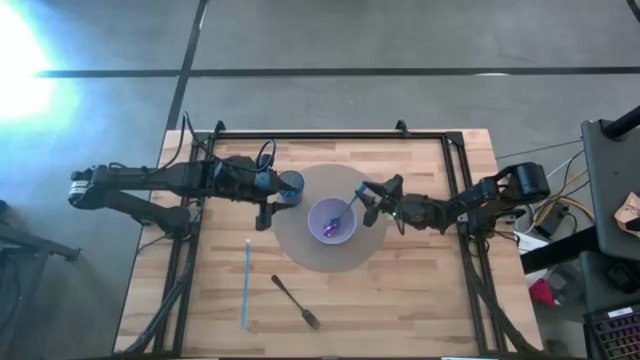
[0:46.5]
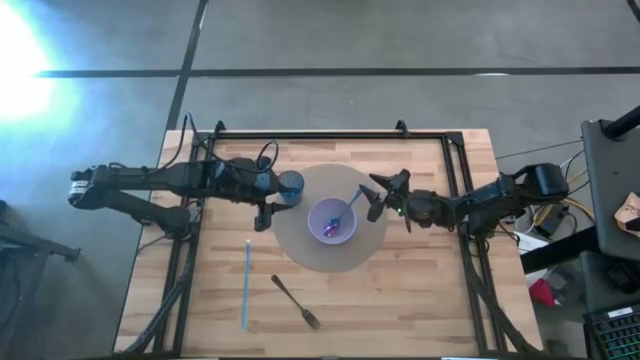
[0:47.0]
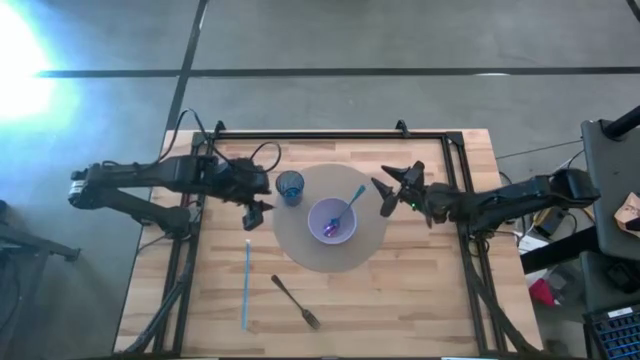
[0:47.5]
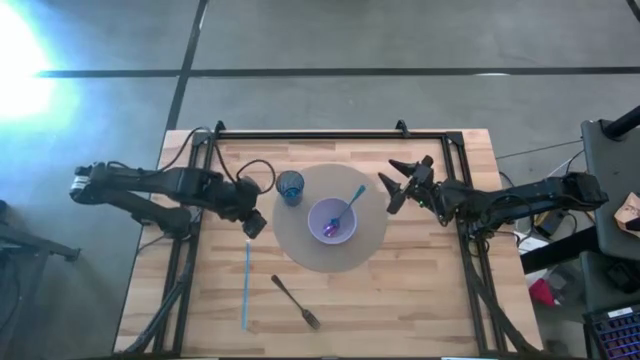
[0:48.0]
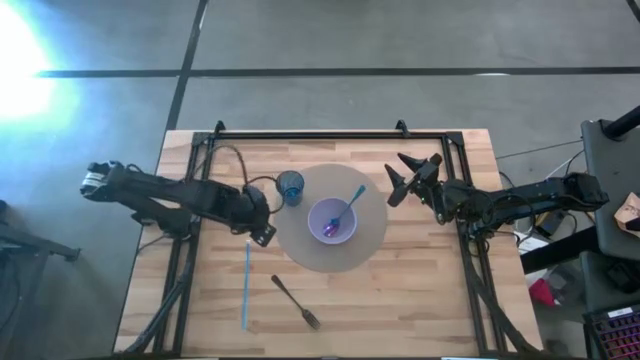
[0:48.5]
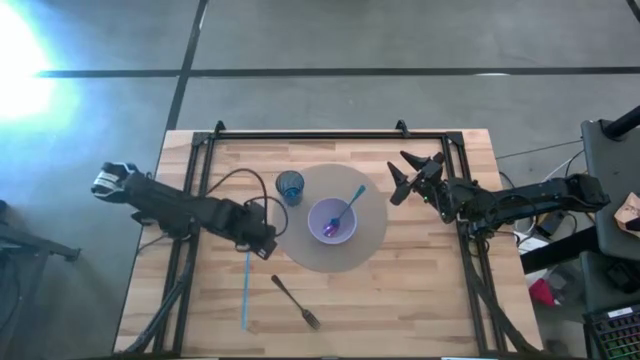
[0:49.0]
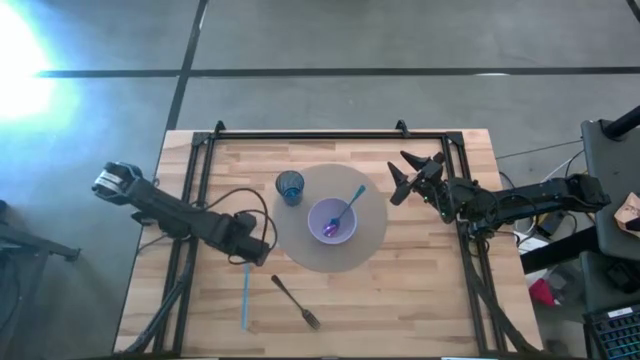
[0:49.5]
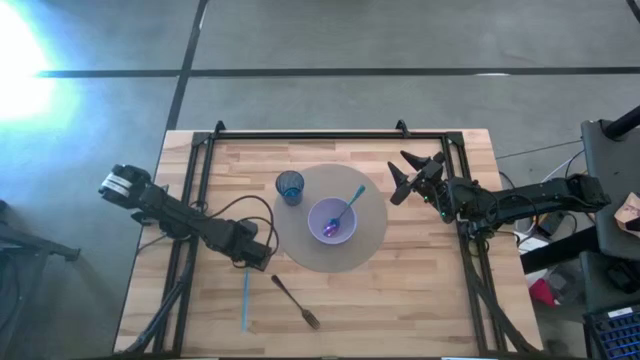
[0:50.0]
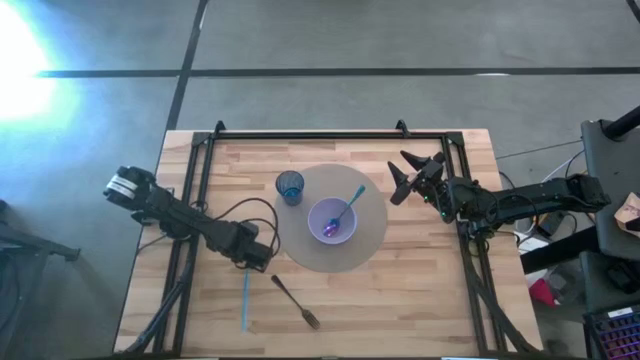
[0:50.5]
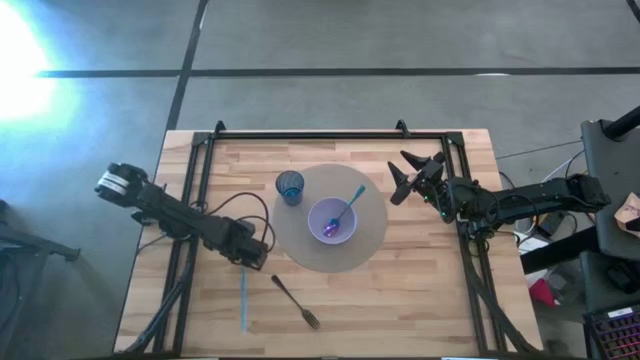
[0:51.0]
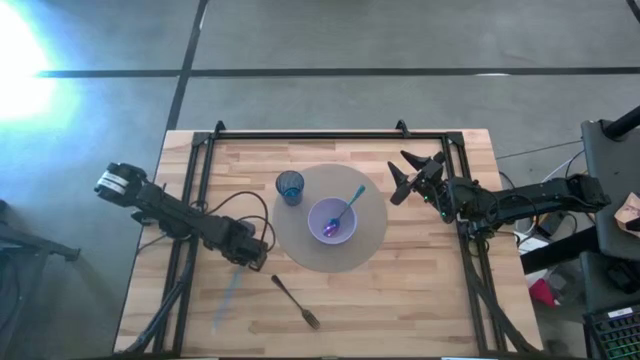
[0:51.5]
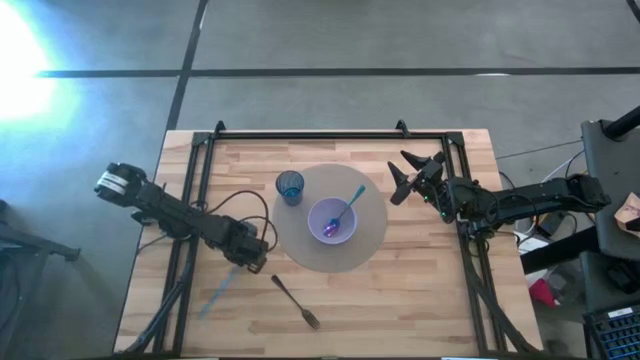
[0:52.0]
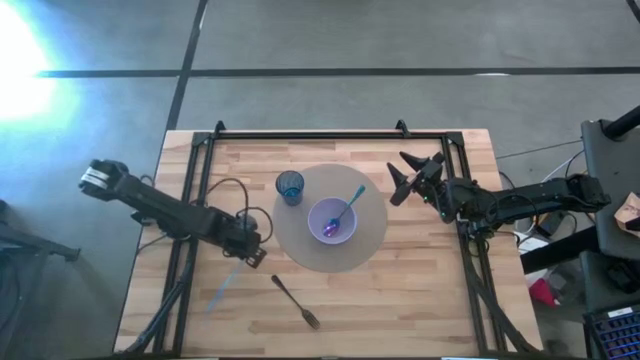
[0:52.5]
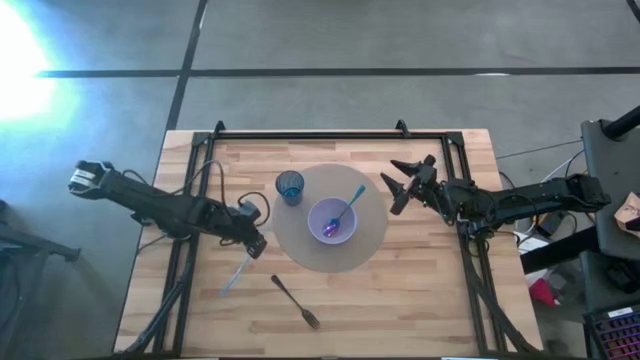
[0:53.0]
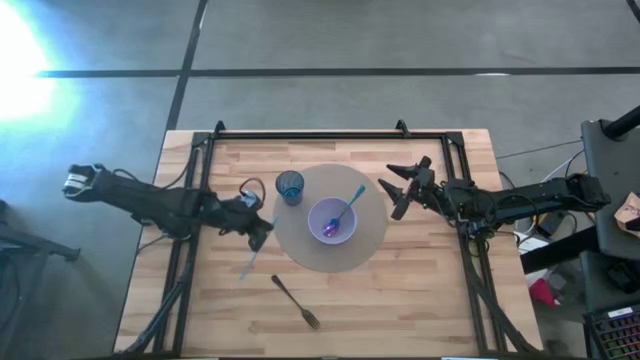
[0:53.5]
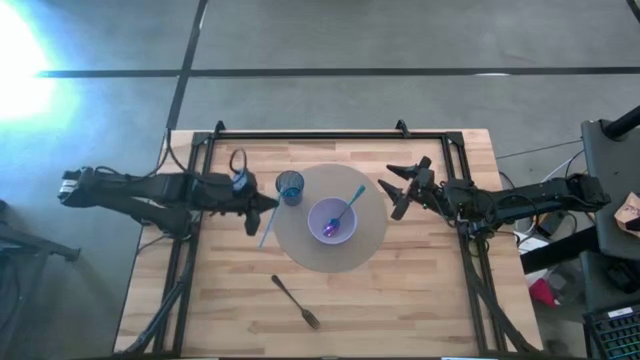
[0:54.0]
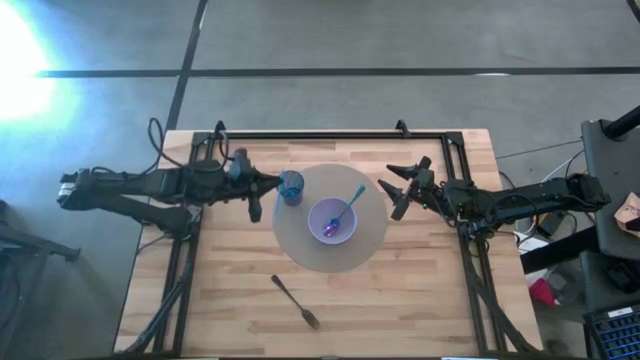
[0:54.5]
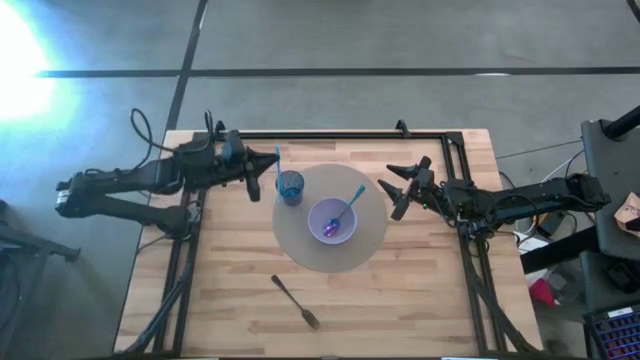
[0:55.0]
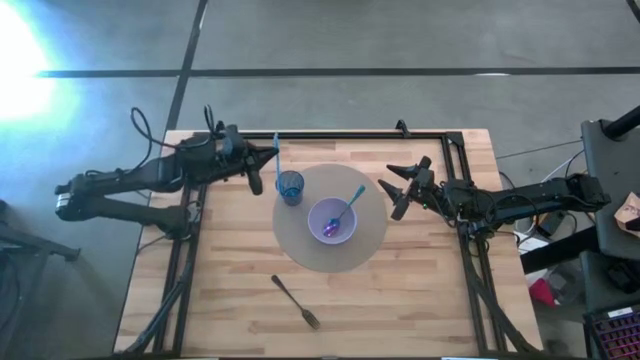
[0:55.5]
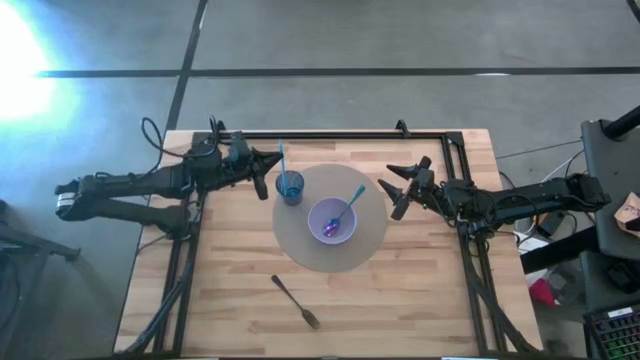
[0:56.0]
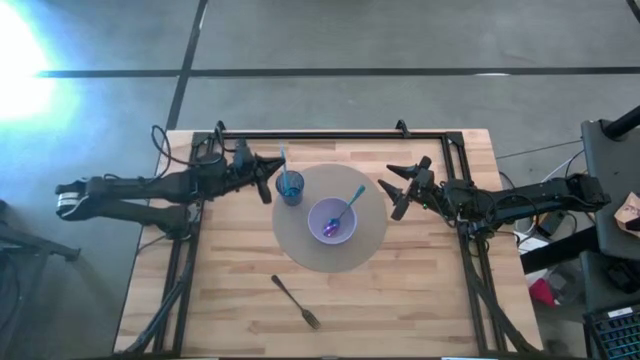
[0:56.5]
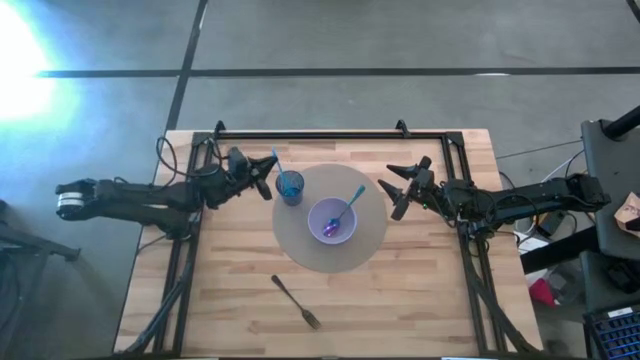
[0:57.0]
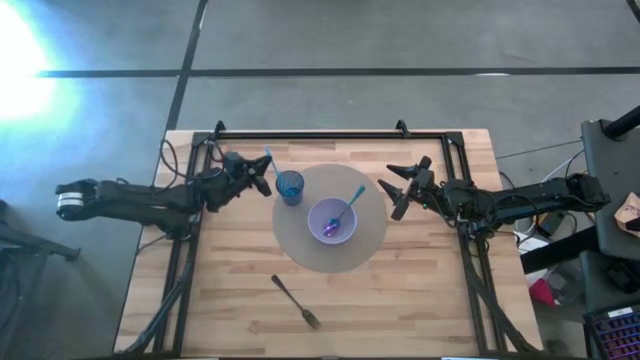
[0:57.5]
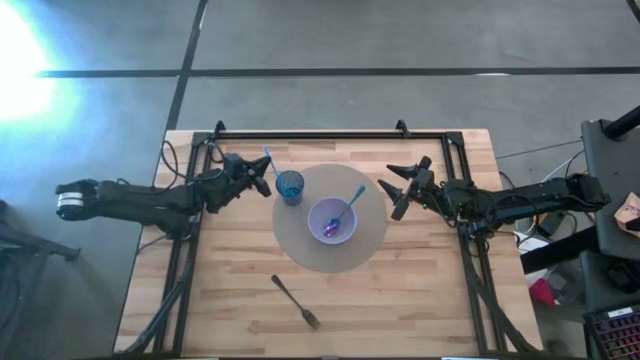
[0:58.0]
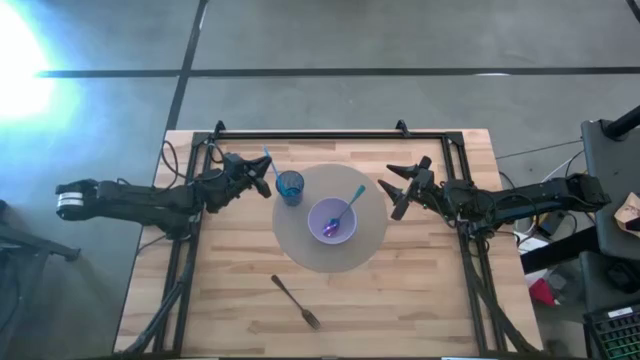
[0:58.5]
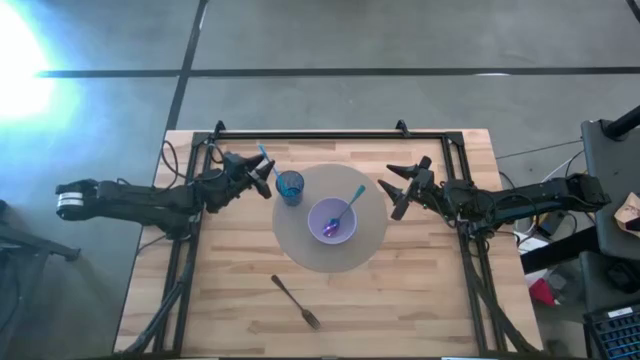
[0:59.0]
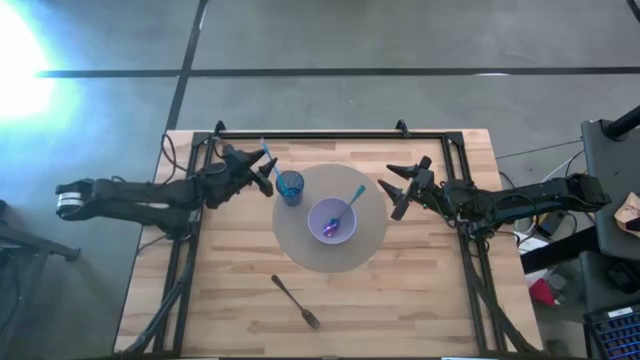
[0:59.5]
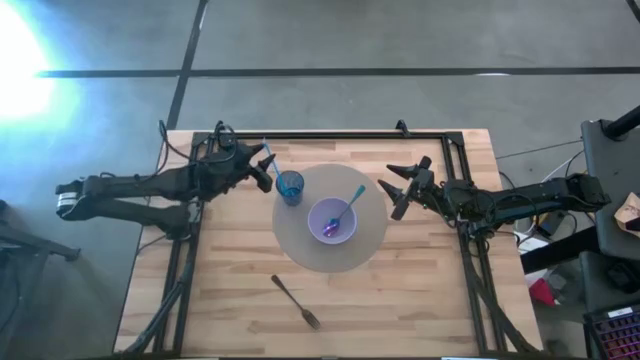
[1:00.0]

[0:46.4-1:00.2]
Task: Pick & Place Utensil
Put the blue straw into the blue cup

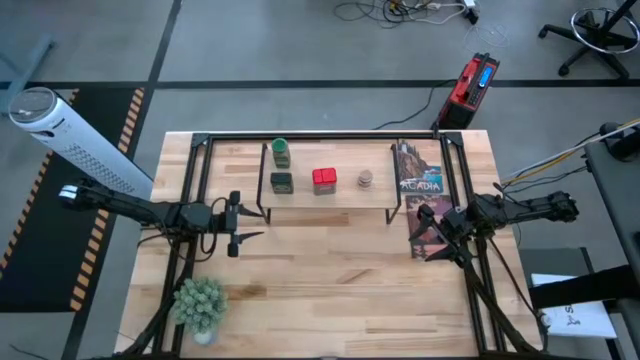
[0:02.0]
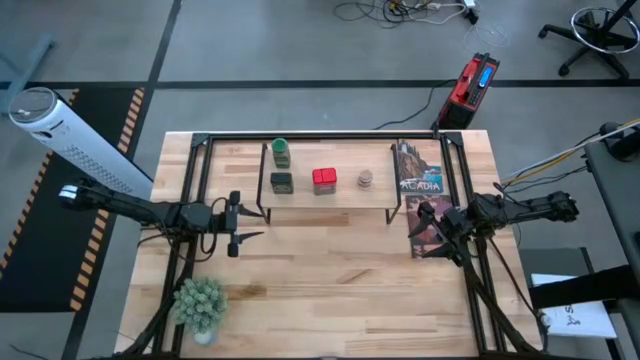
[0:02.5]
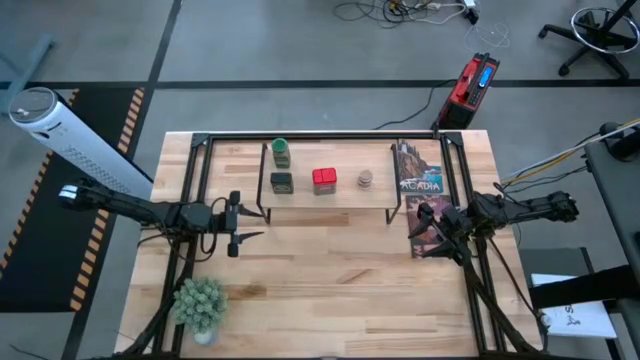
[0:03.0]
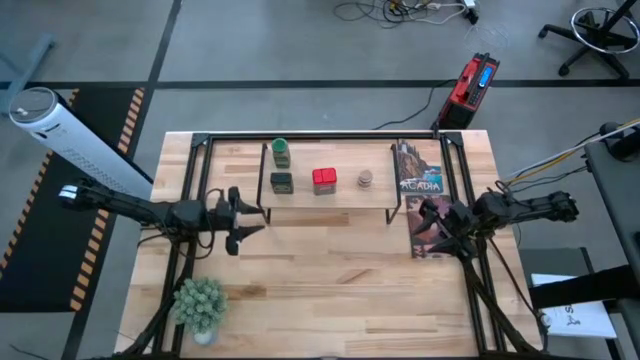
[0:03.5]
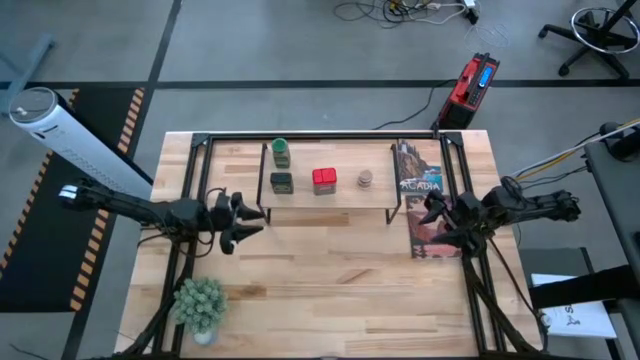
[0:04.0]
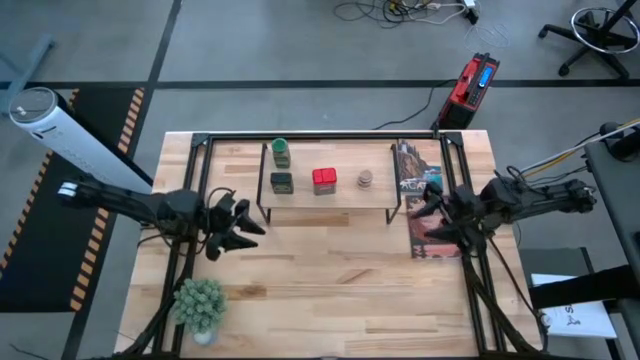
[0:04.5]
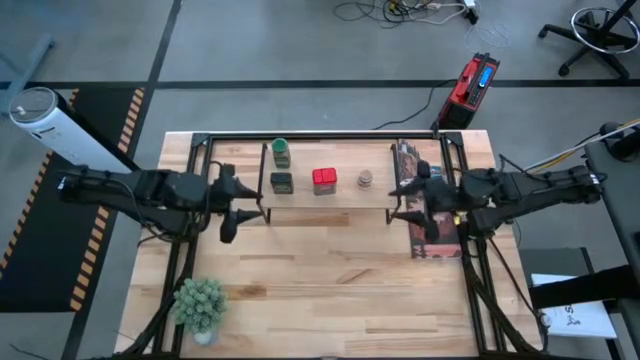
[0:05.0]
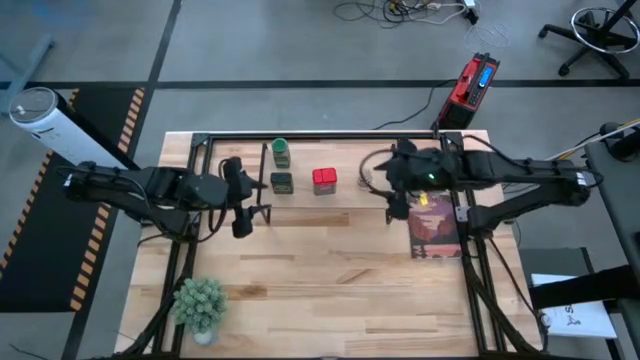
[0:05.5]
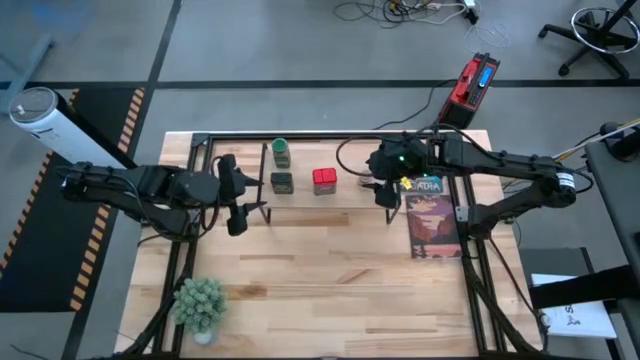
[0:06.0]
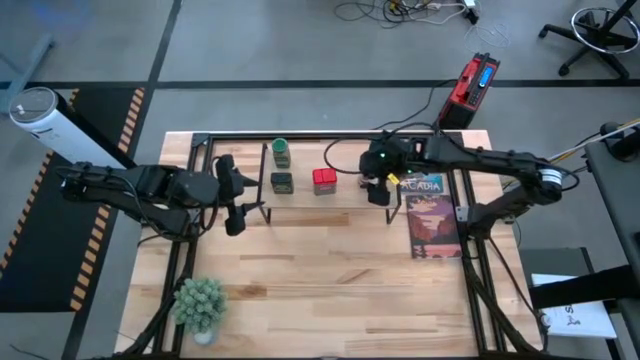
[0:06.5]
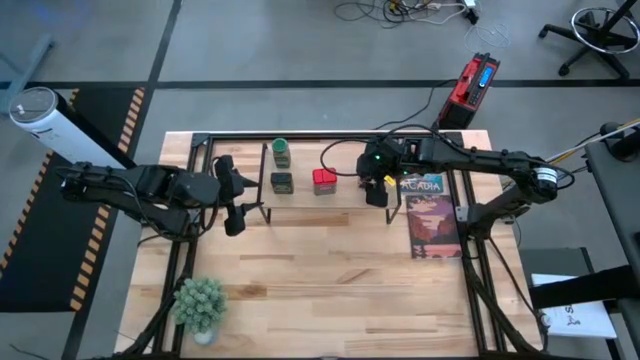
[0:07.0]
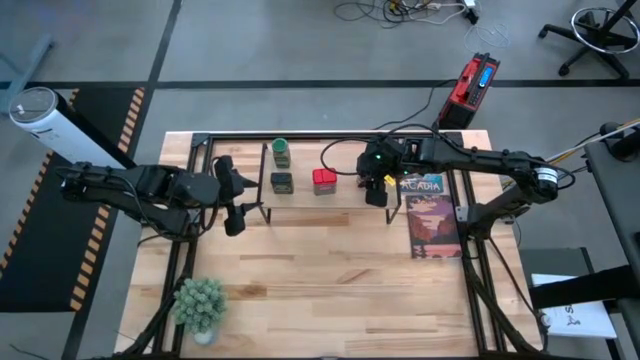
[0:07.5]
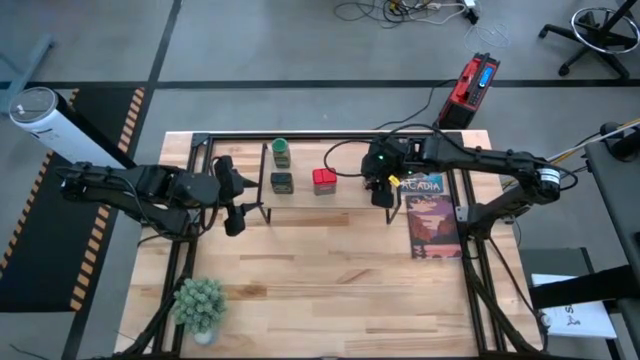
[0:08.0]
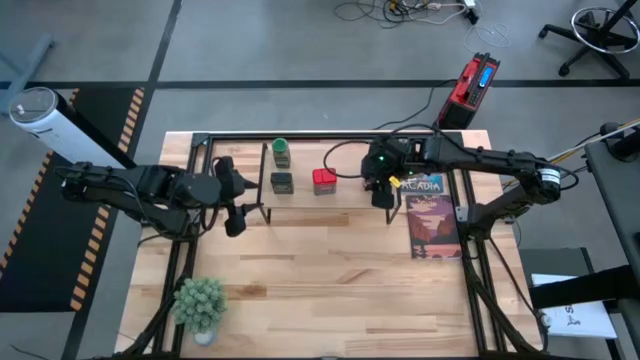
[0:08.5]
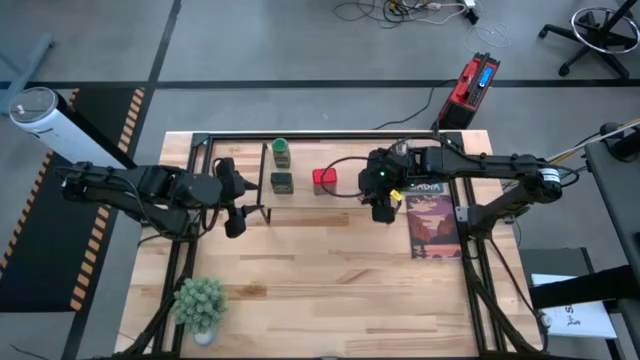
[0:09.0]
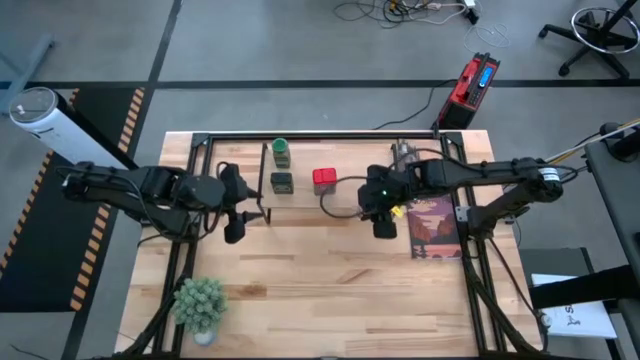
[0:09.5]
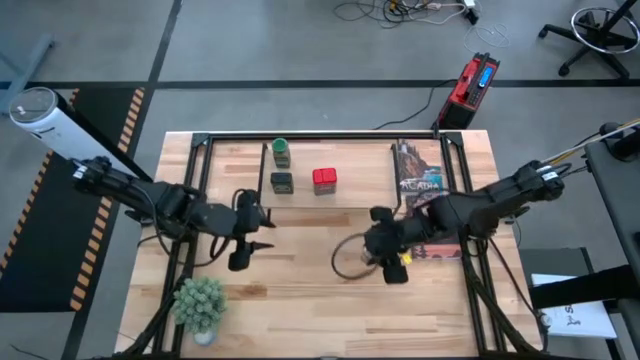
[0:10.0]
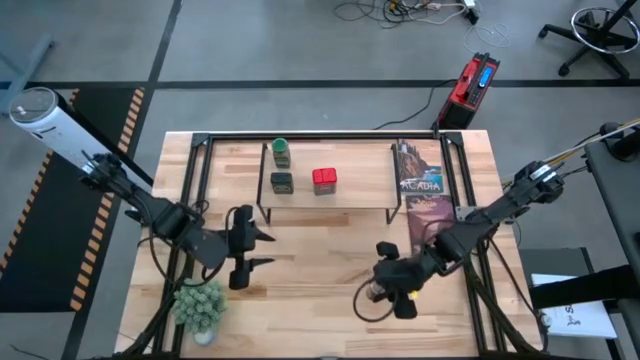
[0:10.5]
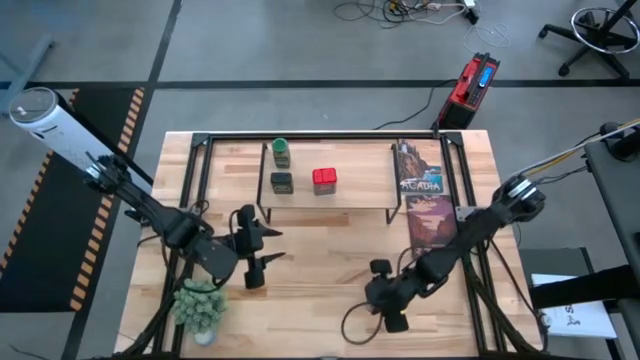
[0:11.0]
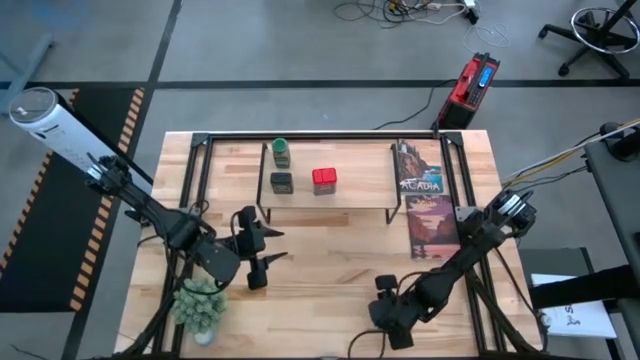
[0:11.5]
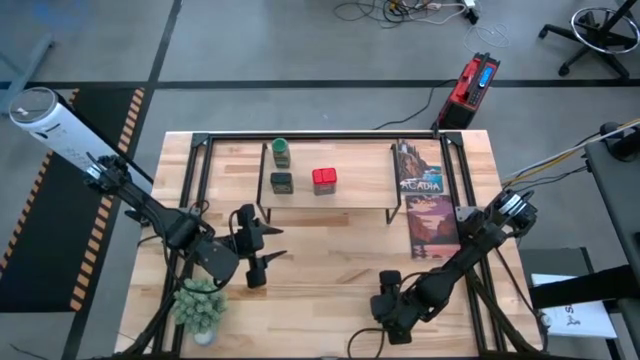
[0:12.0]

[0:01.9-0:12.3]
Task: Shelf spices
Remove the brown seasoning bottle from the shelf
